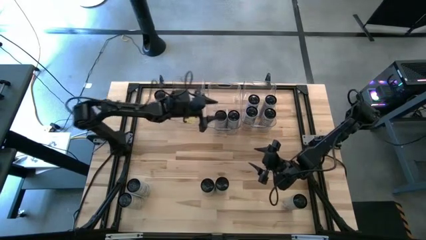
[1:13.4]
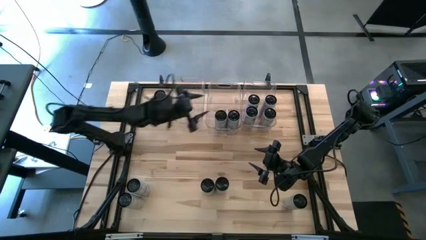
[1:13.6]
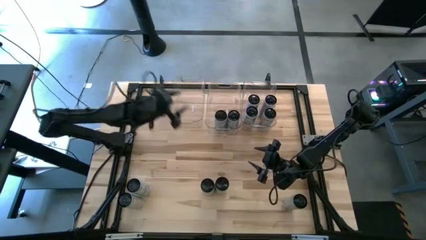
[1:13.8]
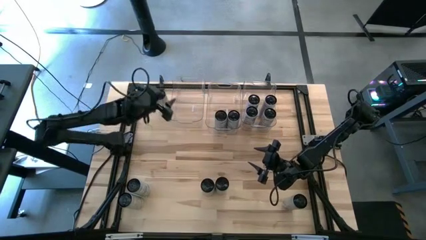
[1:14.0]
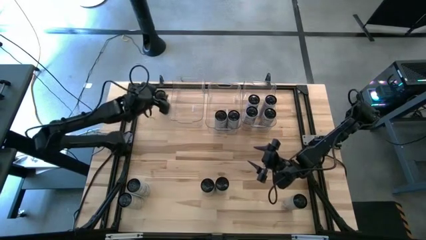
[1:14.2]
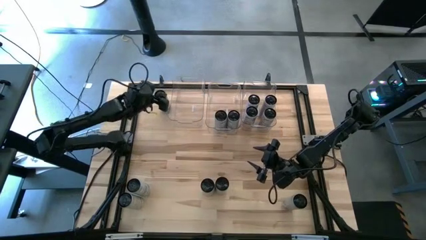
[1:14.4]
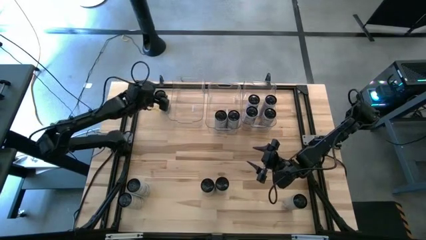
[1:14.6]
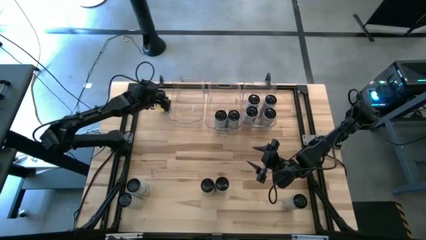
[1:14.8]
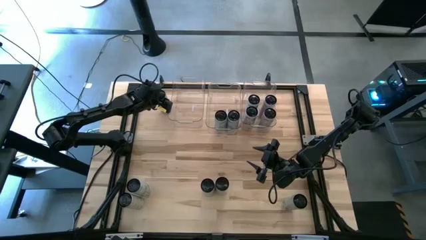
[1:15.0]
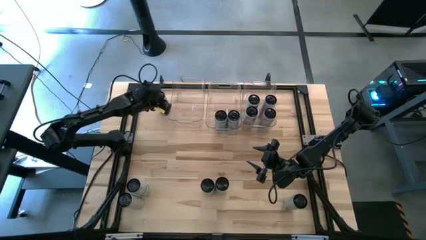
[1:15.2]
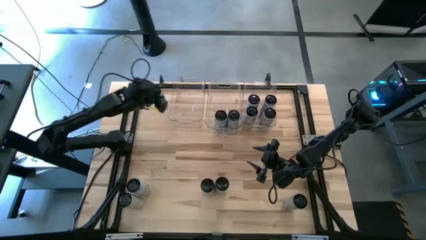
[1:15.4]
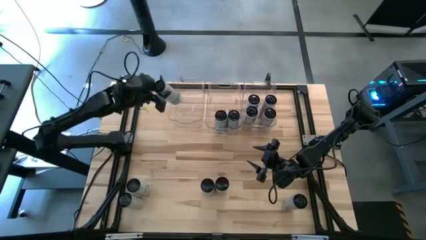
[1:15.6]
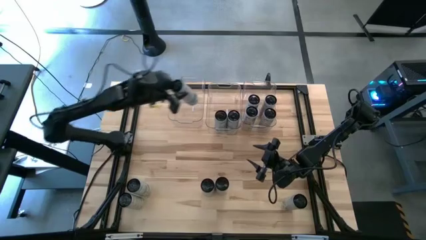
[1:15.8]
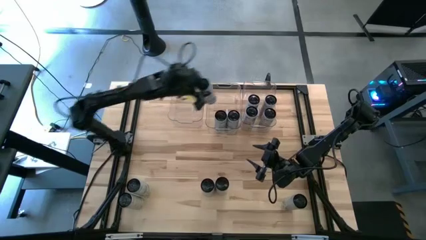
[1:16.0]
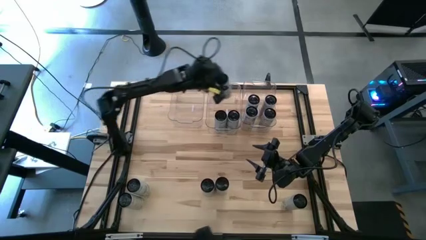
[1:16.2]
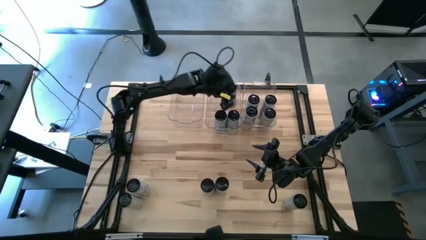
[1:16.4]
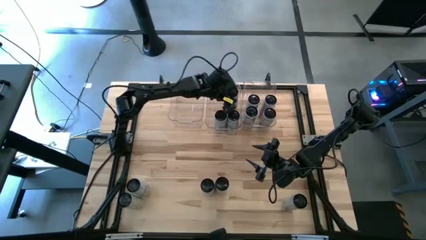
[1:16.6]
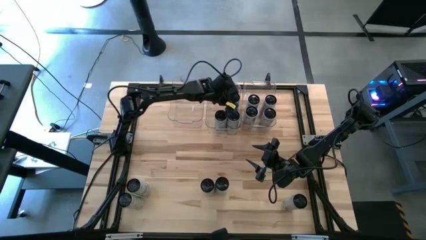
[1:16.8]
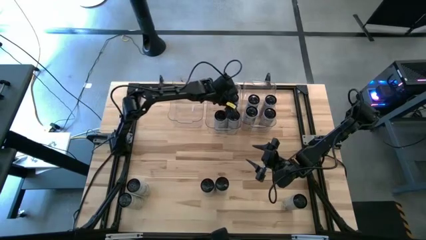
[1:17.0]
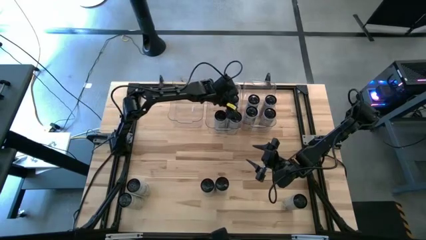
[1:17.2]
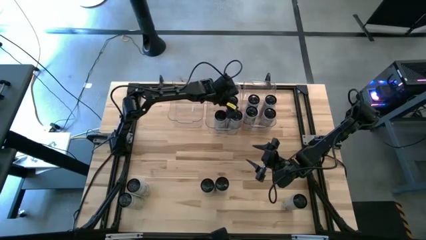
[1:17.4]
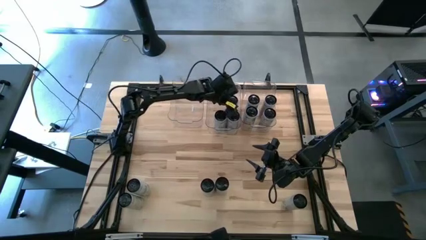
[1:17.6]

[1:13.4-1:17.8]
Task: Sort soda cans
Put the top white-blue soda can into the middle transparent bin

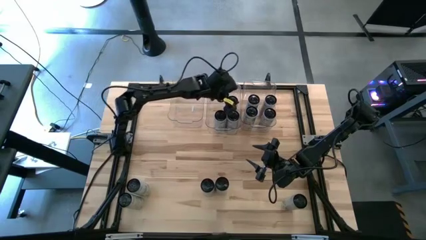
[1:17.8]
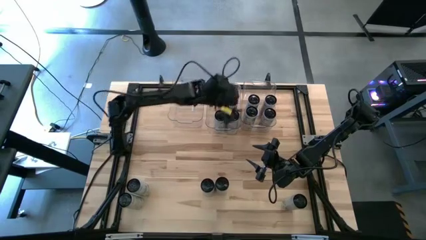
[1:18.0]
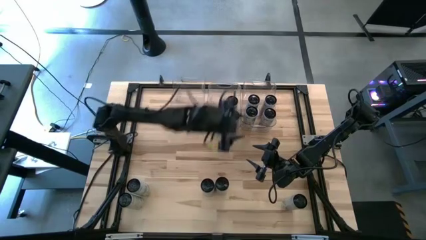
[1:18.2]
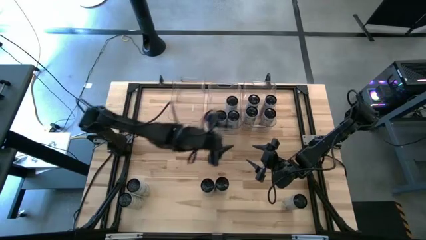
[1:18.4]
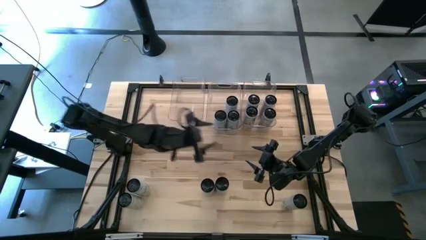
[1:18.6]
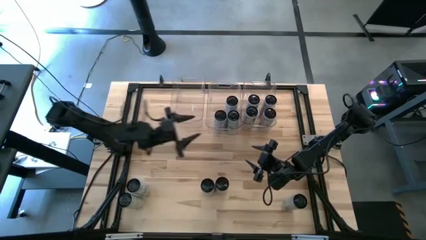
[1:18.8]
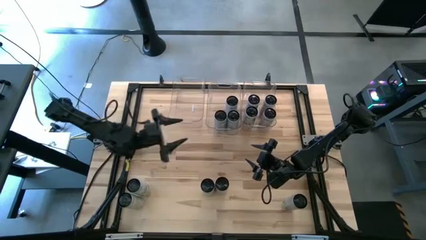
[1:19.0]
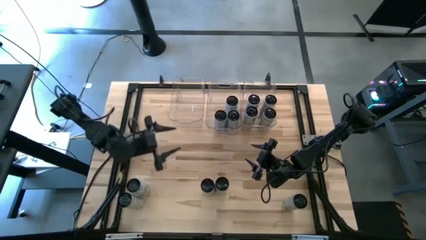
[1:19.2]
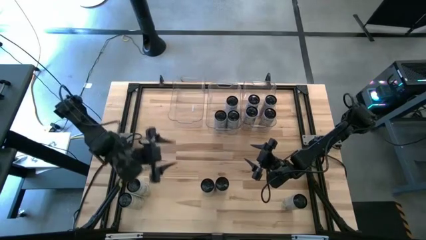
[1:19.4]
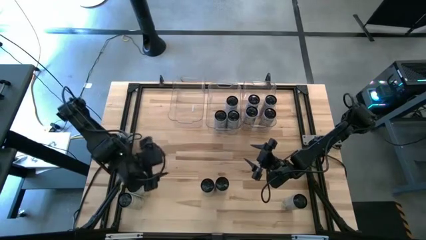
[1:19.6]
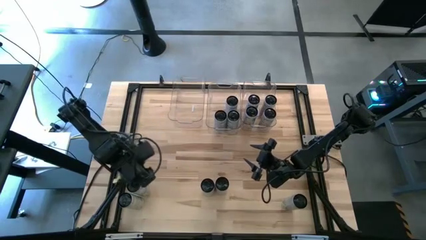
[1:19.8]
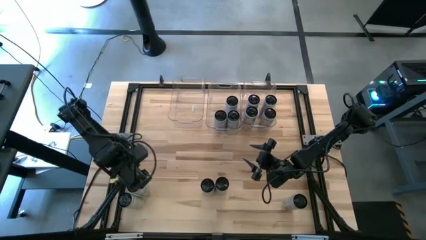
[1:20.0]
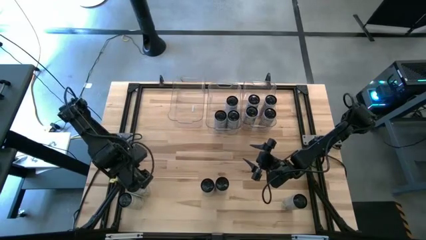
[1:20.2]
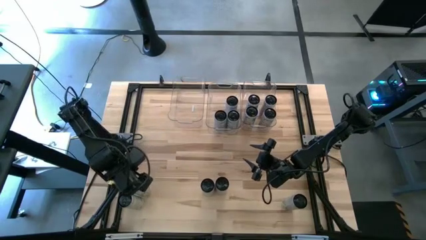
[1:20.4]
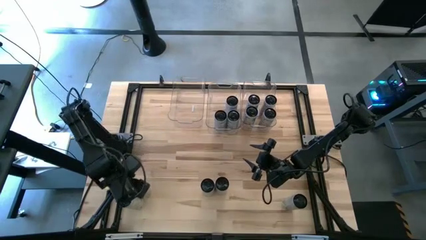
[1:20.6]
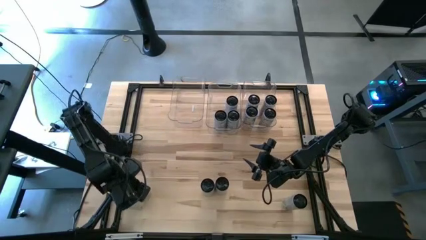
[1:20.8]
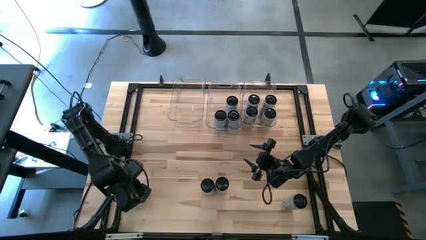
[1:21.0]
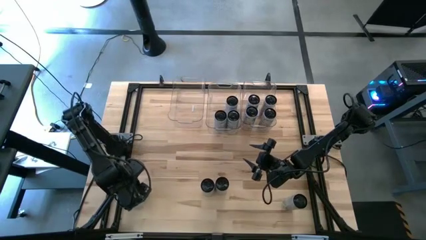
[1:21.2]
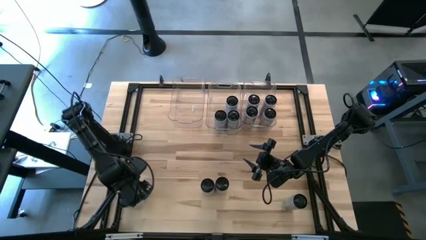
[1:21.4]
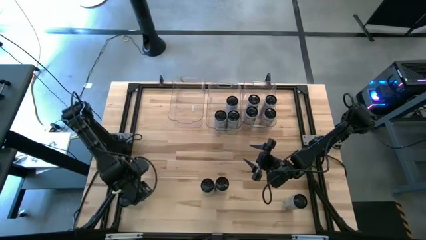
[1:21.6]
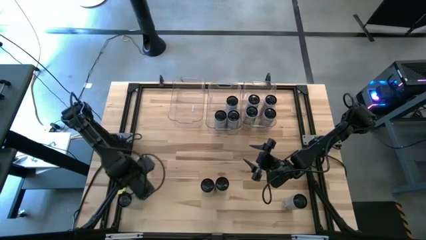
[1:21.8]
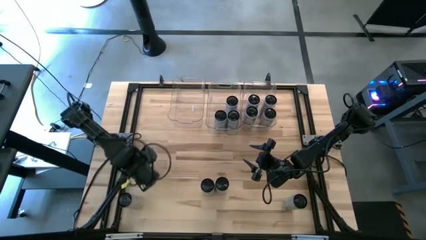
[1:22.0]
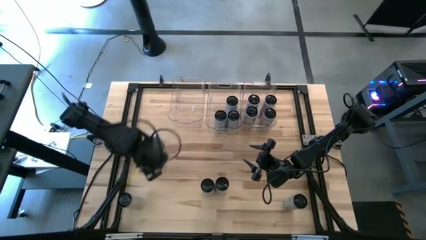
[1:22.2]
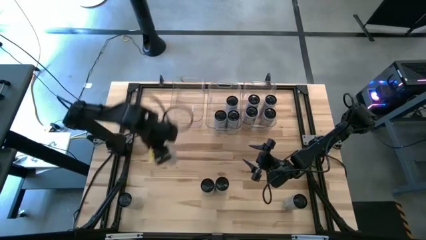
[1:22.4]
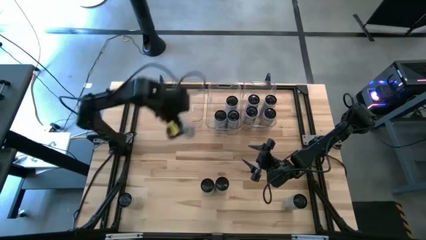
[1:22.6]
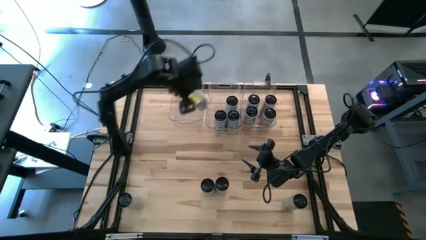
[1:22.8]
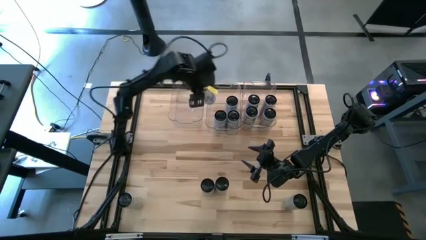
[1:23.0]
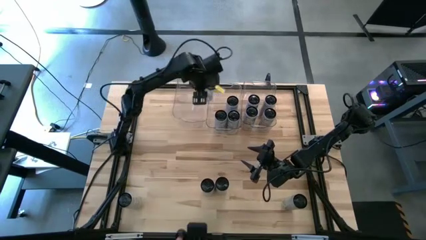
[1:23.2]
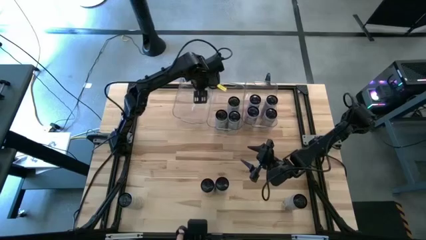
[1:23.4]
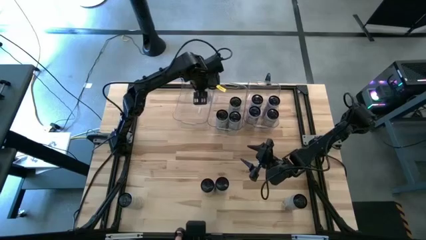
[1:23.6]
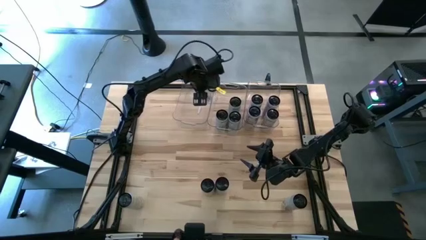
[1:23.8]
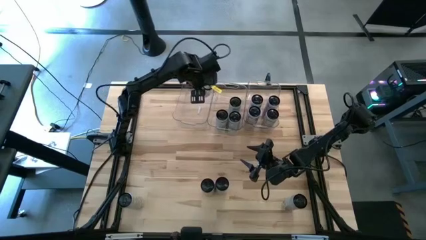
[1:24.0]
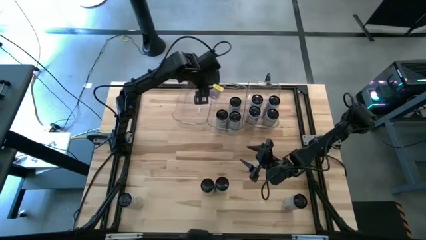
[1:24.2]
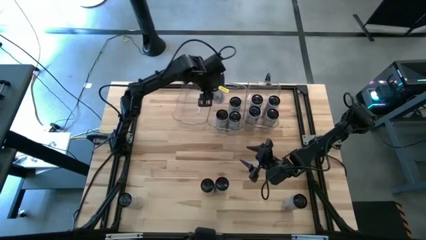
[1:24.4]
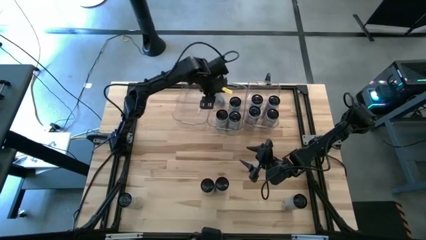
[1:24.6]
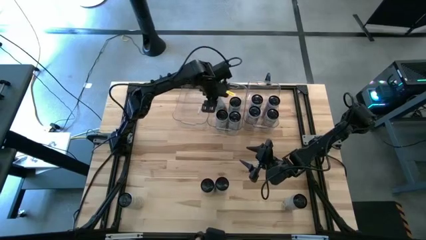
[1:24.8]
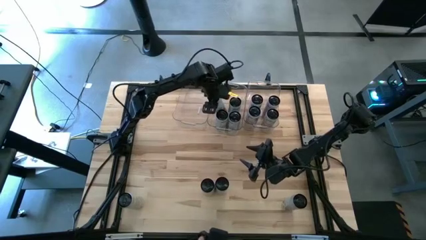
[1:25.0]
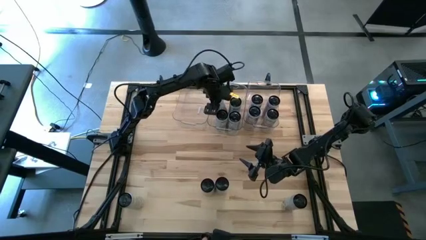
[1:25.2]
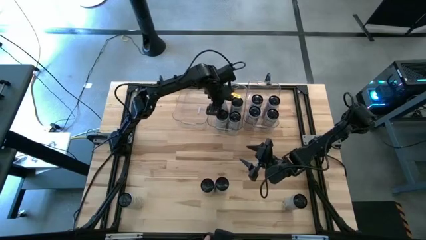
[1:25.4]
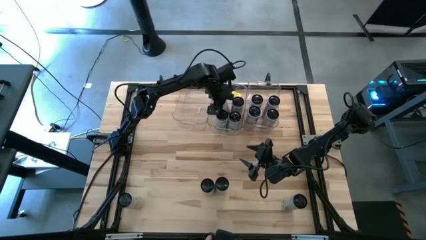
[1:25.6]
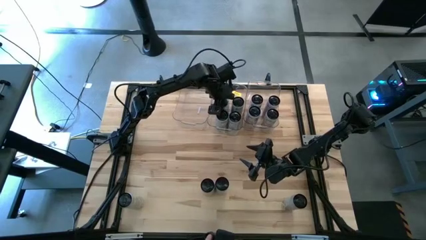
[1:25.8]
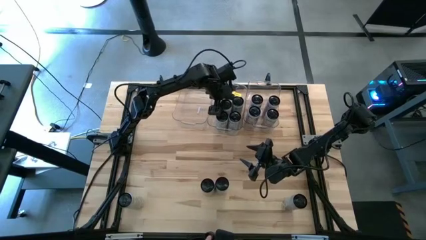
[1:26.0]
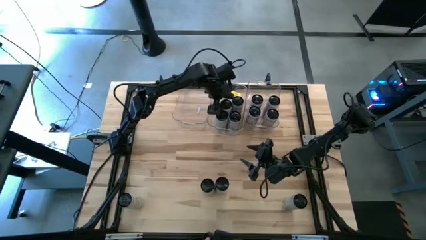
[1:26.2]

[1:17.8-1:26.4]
Put the white-blue soda can into the middle transparent bin

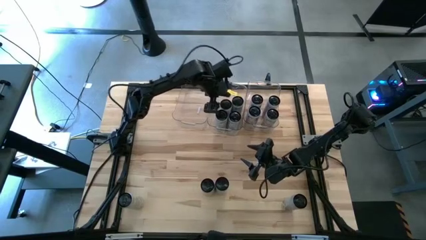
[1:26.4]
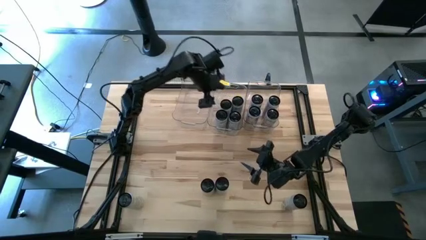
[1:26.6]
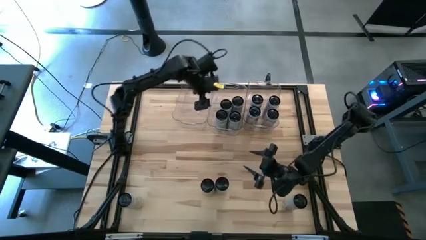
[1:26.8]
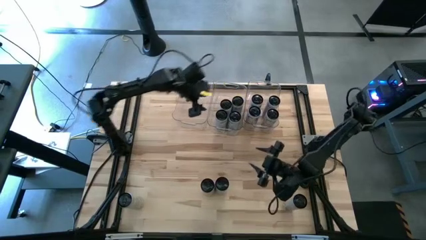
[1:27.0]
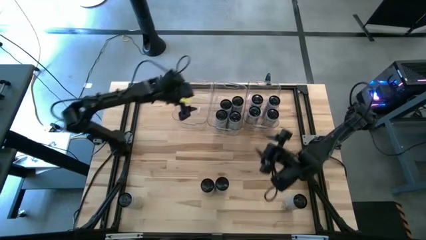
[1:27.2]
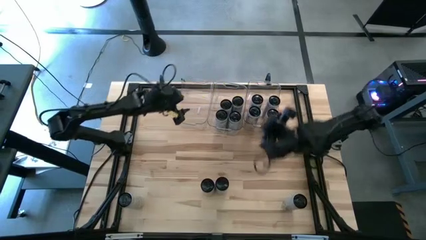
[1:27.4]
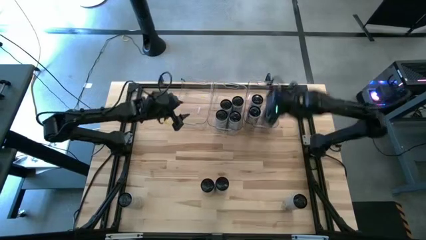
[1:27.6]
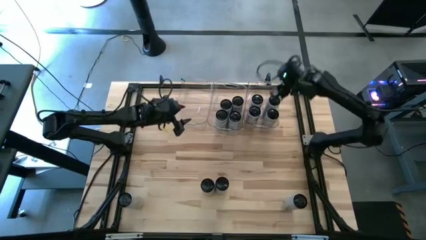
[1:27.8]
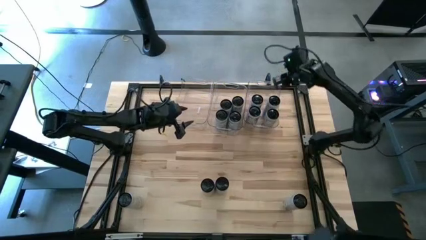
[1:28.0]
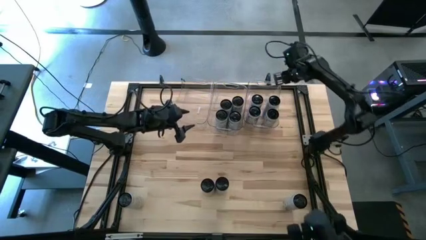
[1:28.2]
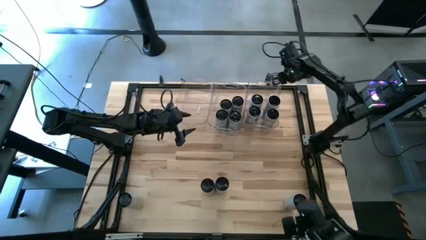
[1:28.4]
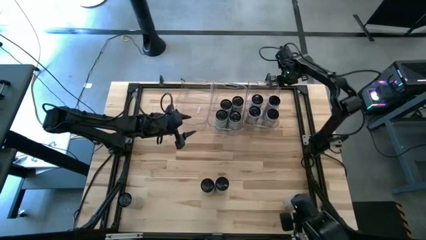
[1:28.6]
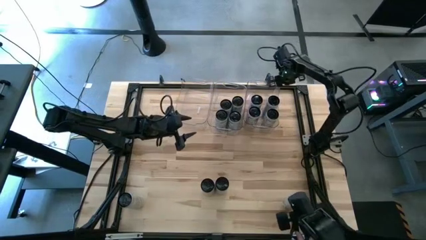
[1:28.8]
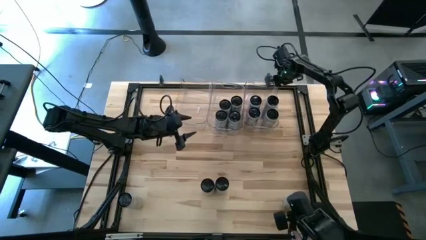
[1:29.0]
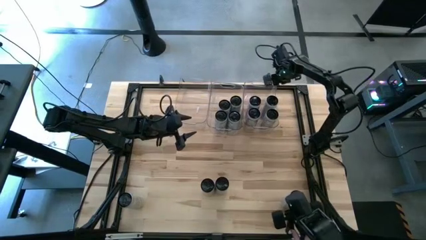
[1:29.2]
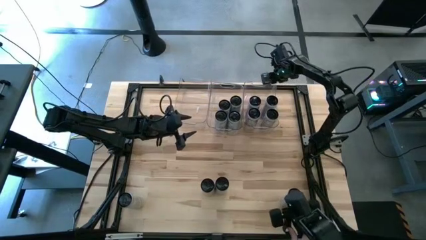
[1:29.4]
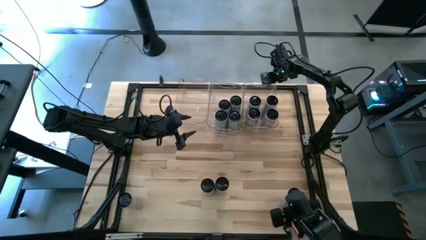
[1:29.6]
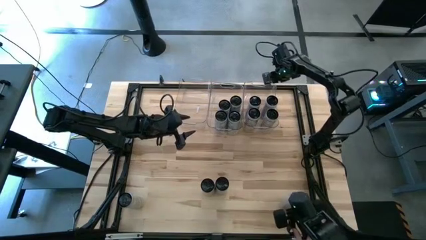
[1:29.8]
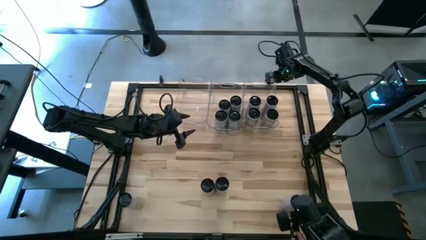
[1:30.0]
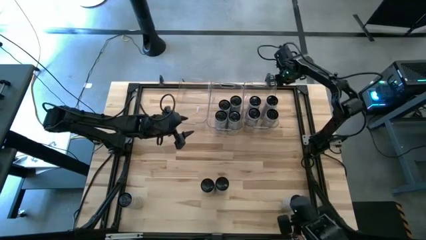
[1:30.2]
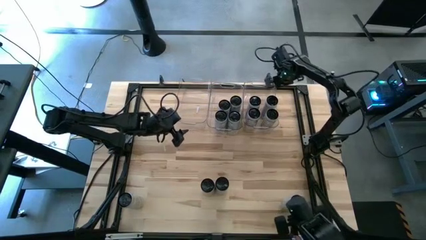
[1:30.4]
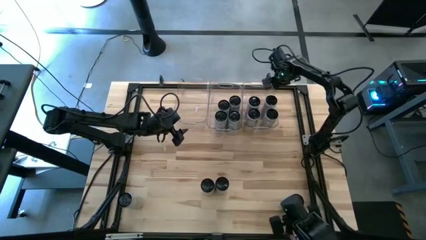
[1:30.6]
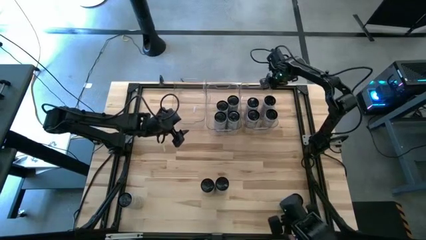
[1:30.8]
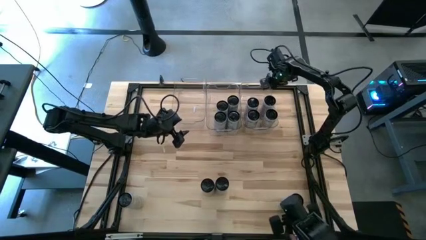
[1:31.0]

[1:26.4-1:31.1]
Adjust the transparent bins on the table
